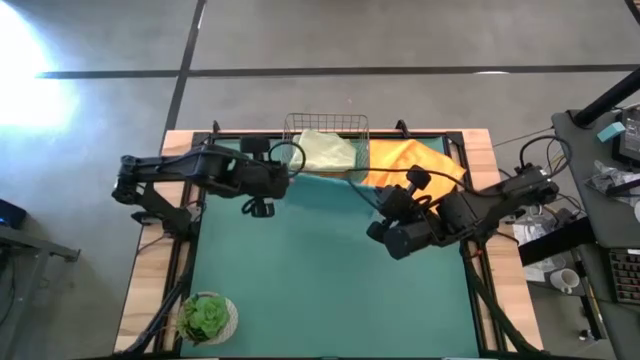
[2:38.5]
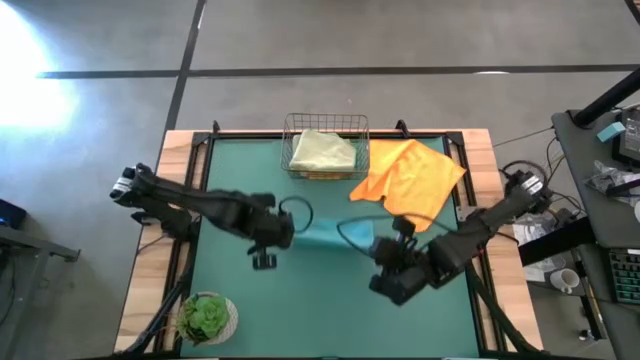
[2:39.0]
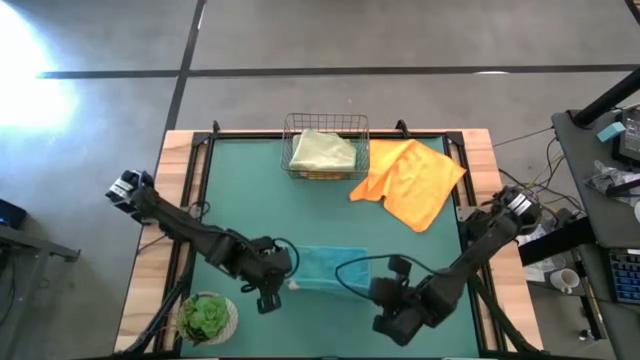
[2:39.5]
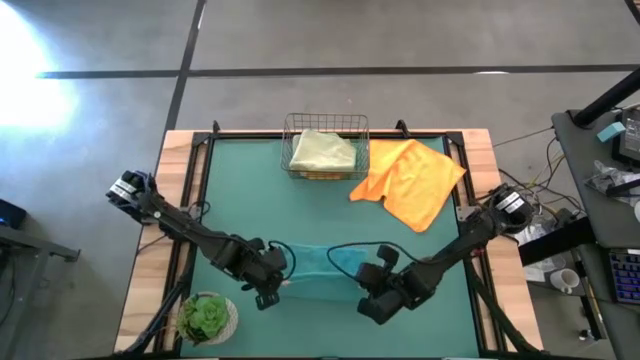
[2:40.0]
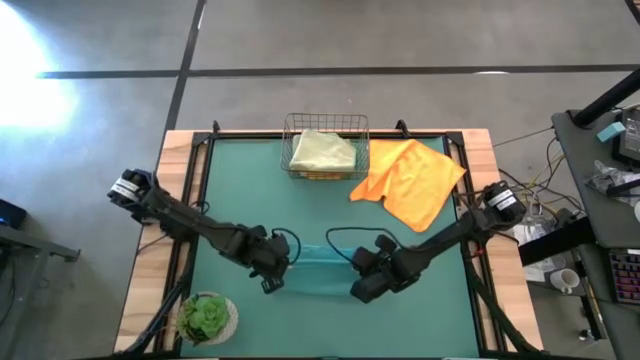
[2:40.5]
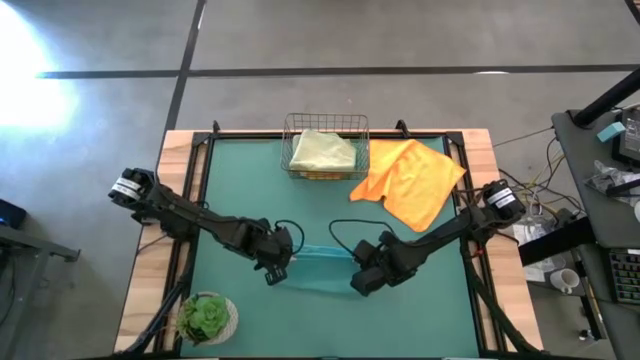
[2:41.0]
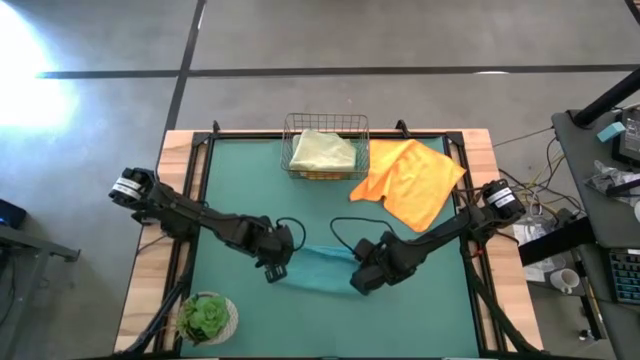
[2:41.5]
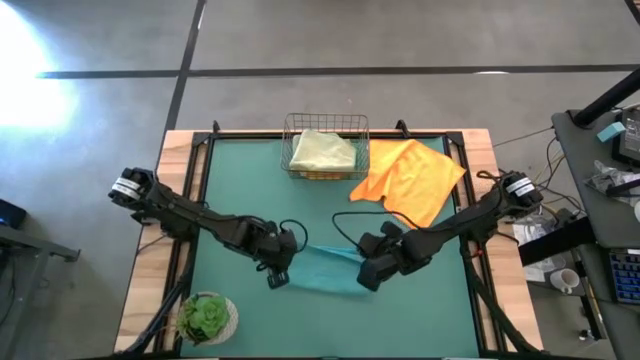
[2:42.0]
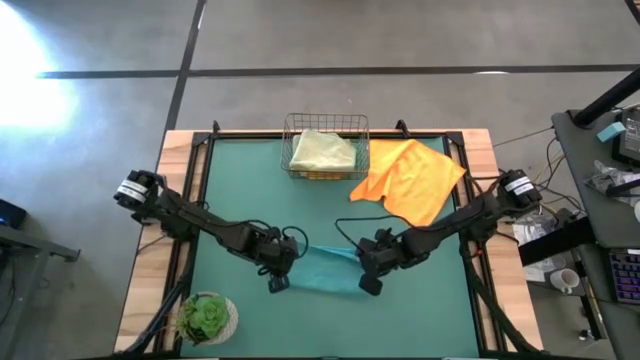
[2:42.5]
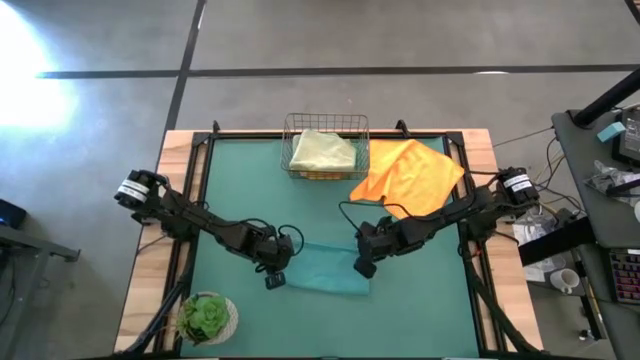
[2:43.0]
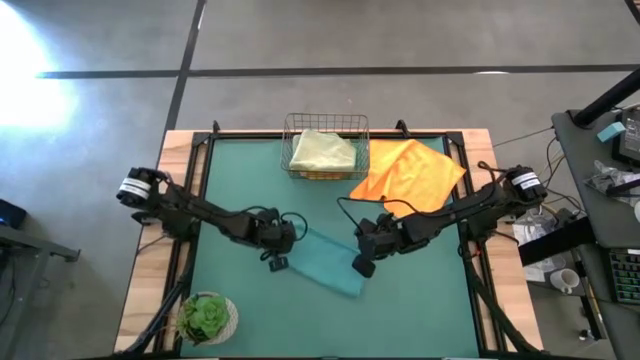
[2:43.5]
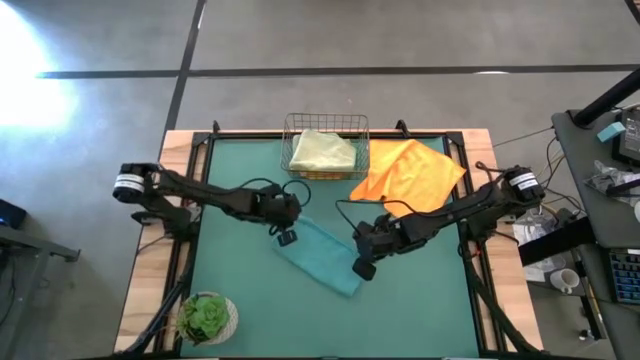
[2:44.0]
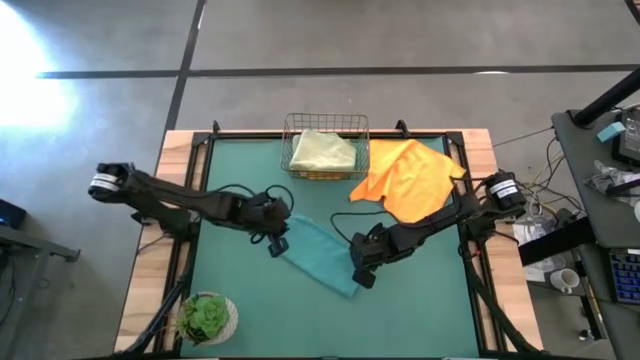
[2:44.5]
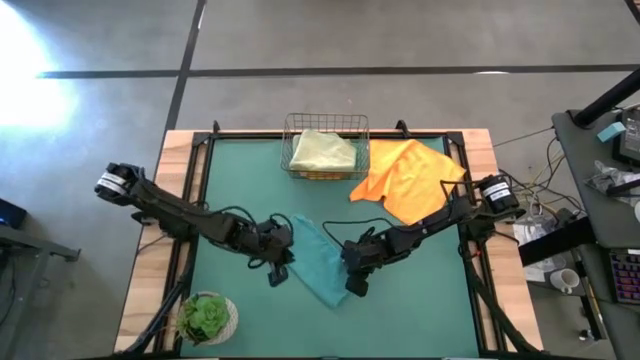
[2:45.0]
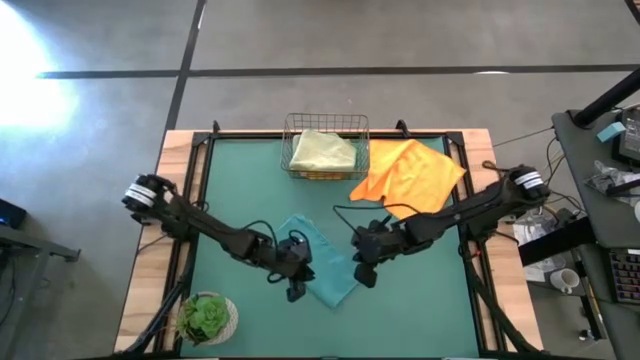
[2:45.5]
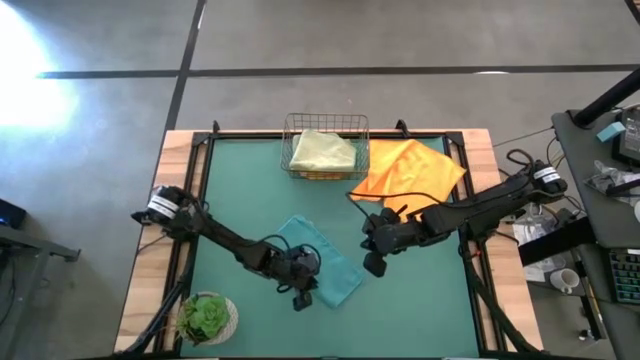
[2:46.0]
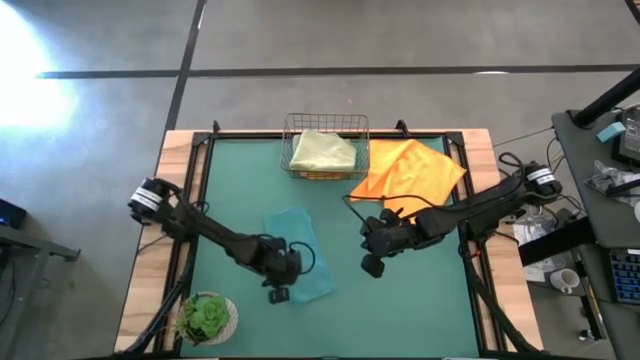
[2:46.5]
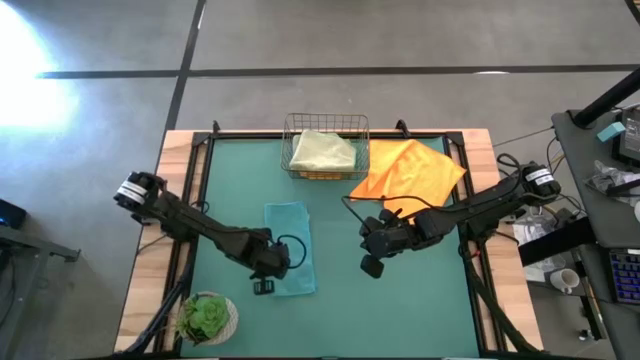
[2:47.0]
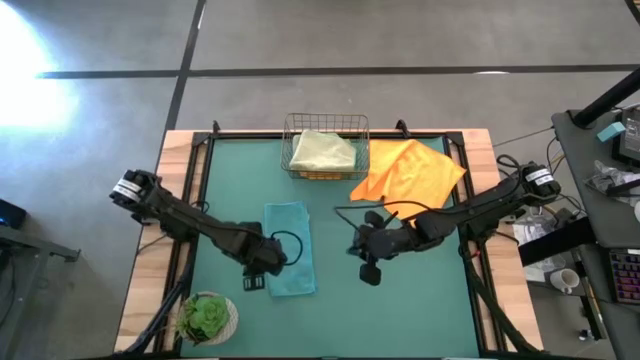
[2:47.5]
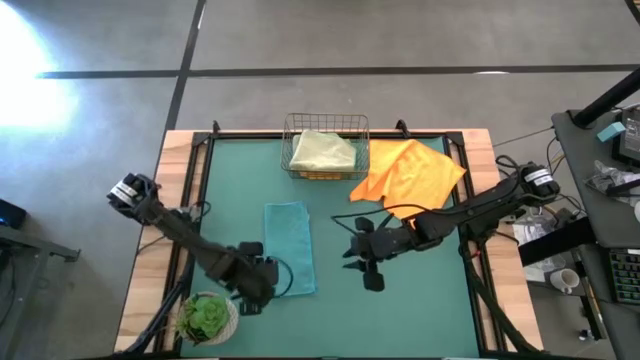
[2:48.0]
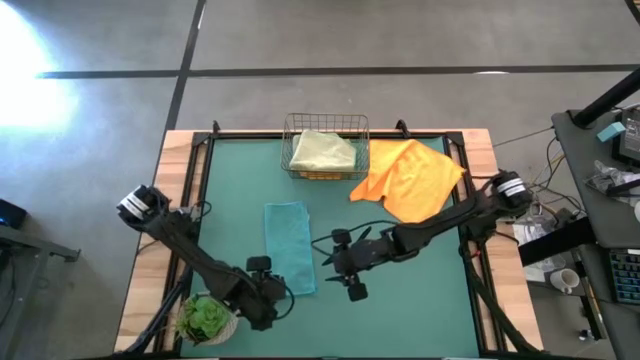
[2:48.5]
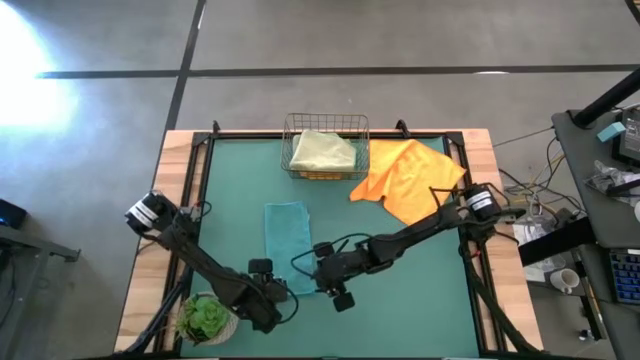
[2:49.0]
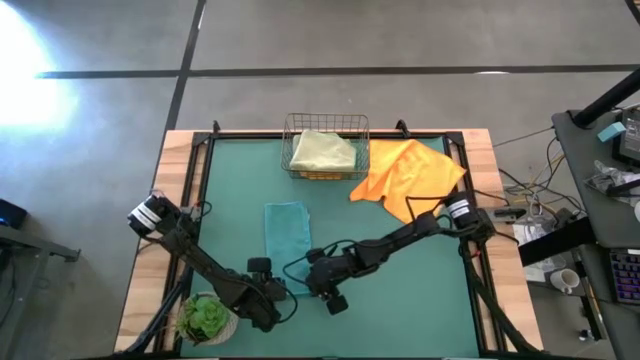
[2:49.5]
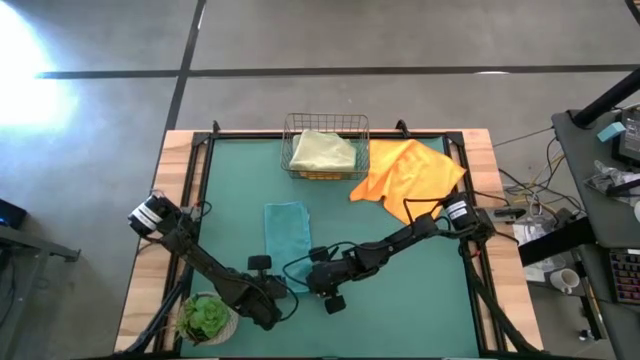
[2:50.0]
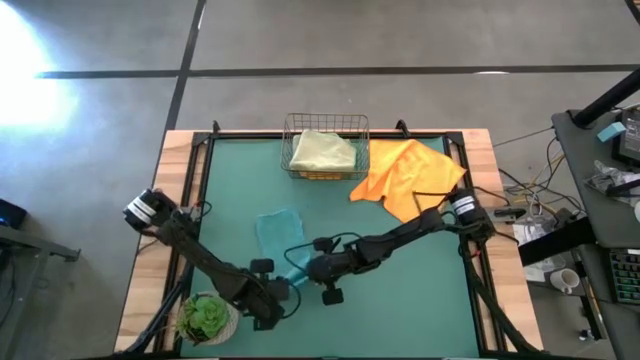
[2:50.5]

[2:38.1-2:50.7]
Task: Fold microfiber towels
Fold the blue microfiber towel

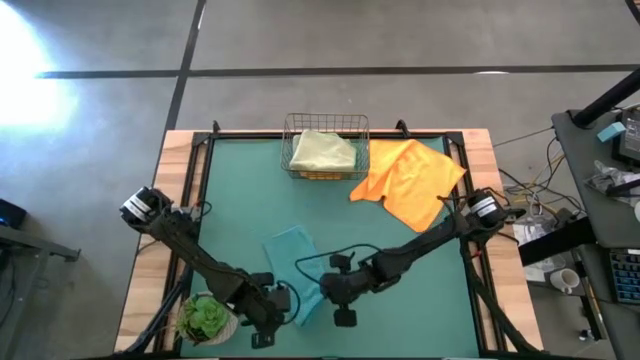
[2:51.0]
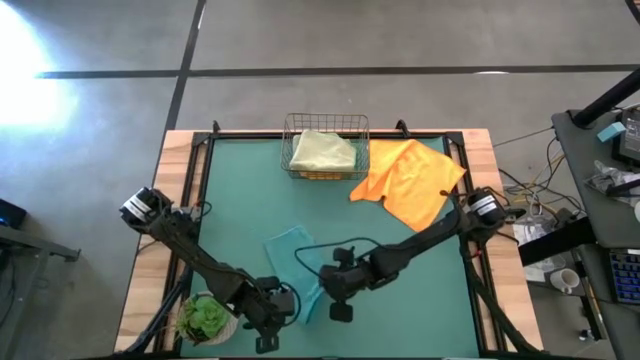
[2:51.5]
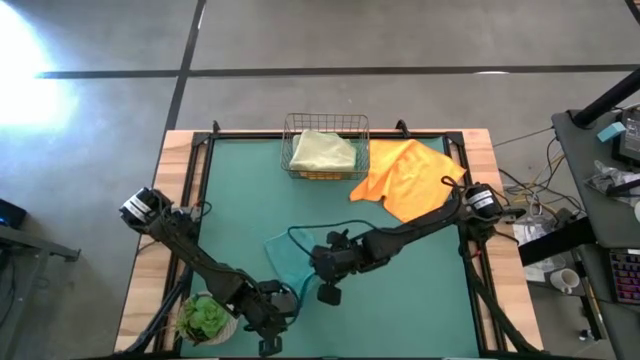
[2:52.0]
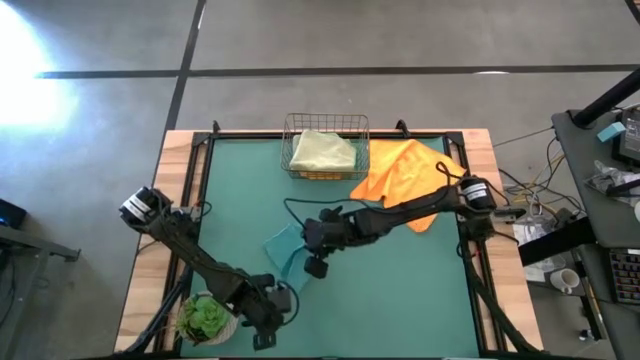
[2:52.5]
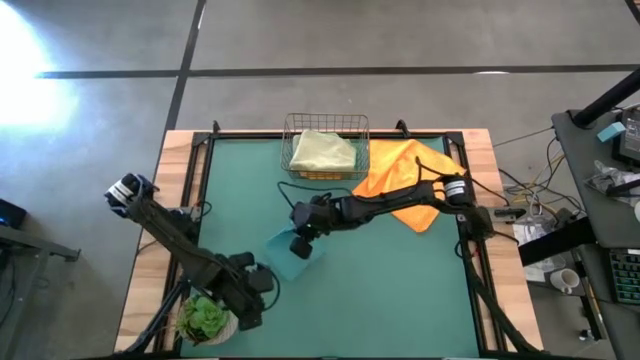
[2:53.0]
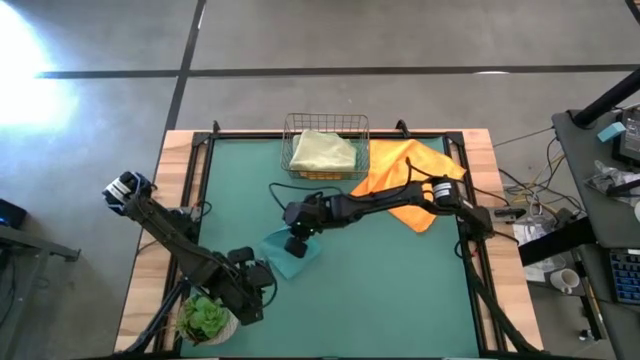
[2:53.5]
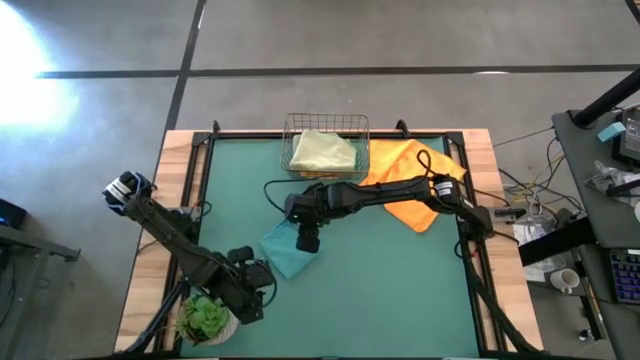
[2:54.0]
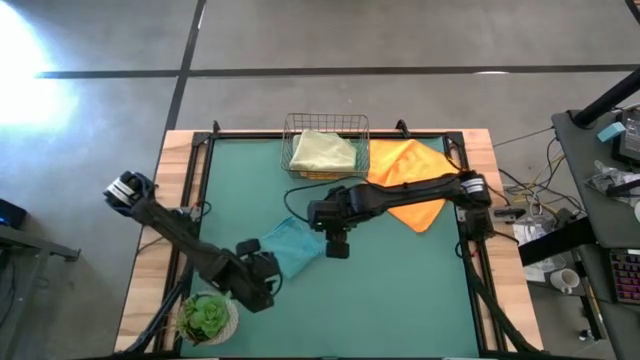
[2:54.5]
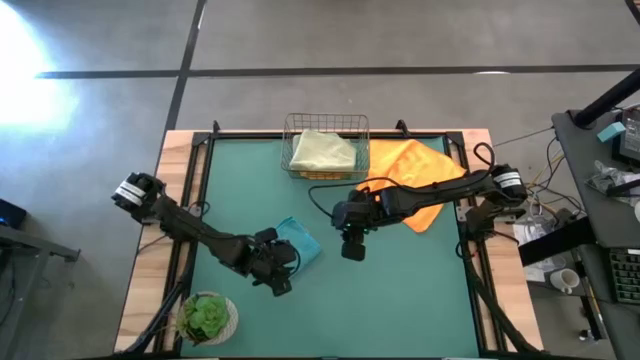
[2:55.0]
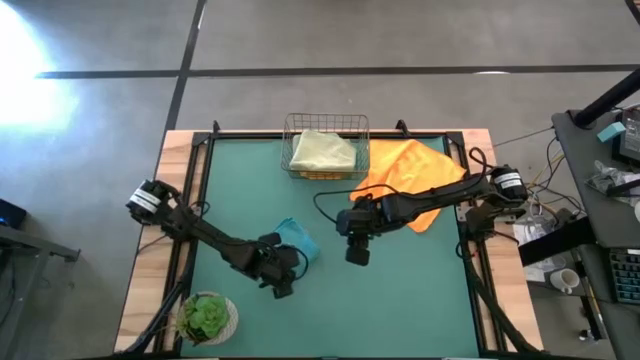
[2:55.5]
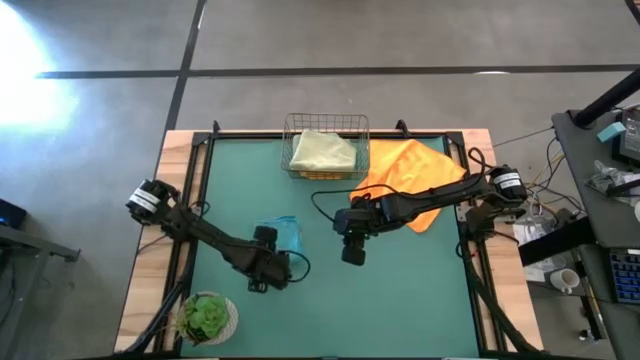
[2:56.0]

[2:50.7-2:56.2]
Fold the blue microfiber towel

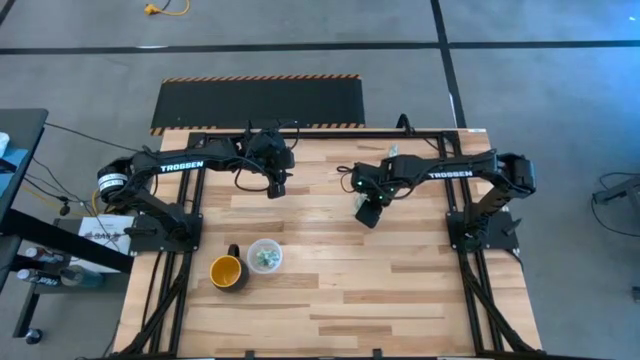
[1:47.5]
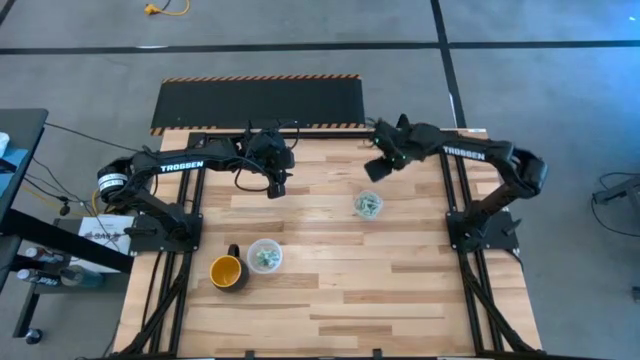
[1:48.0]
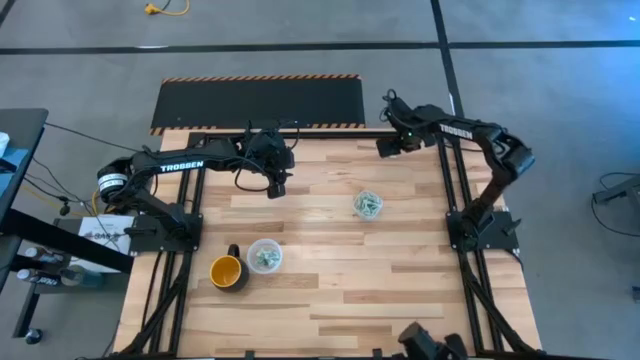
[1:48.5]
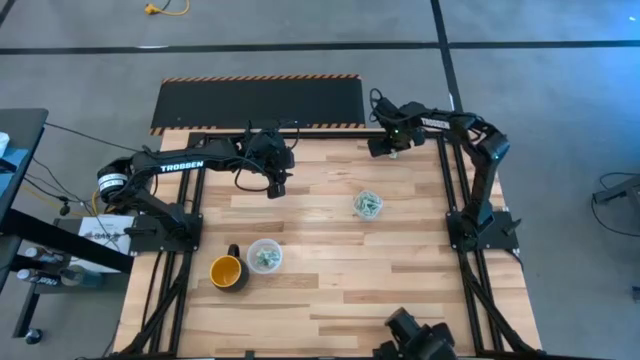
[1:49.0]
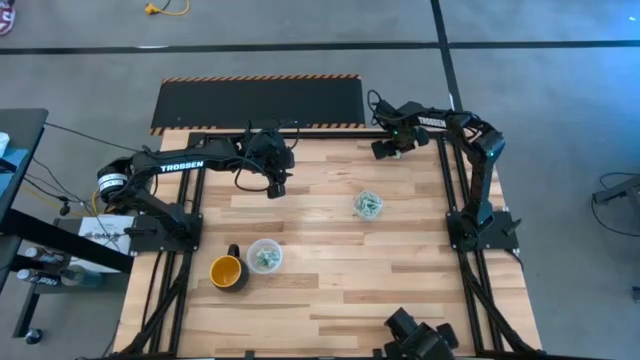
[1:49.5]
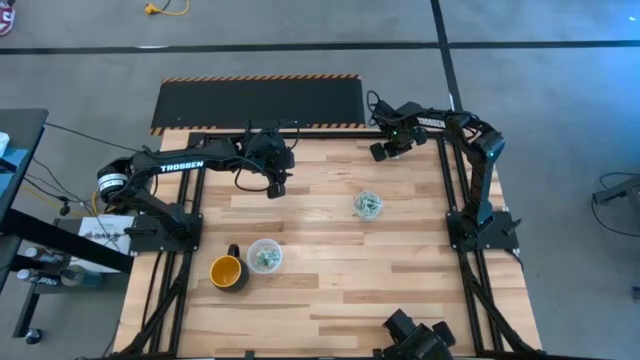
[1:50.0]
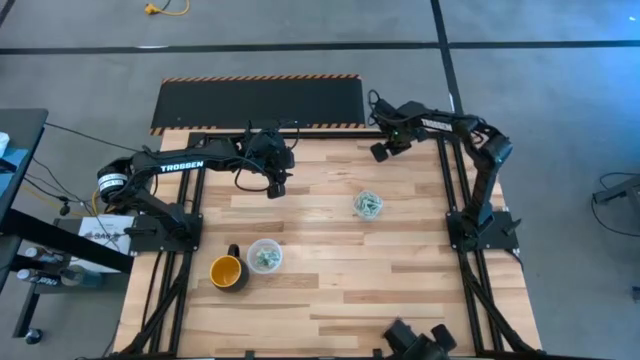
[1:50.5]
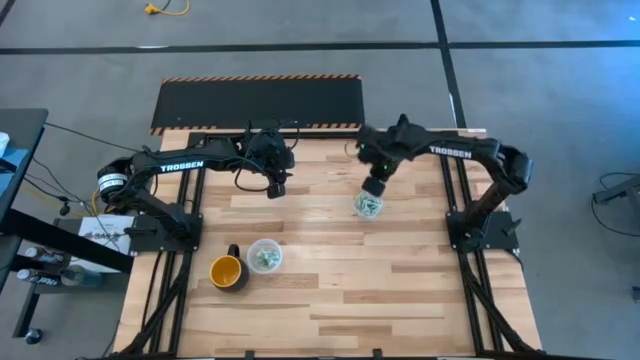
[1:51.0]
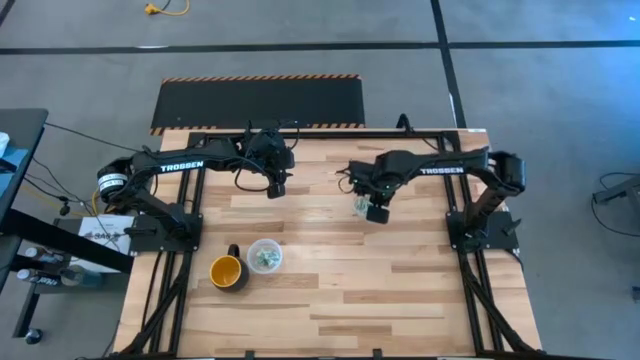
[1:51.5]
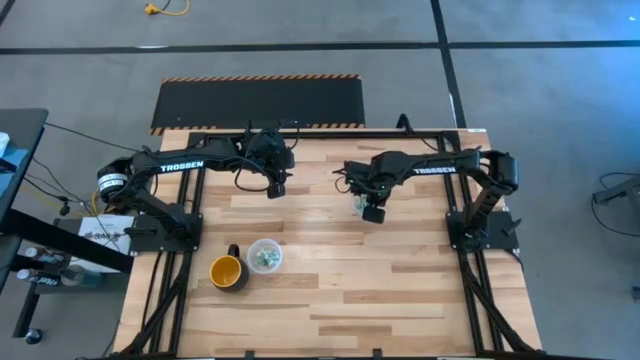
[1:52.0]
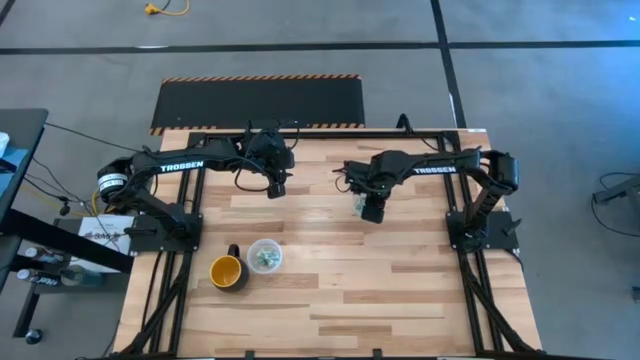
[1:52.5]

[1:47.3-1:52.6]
Task: Pick and place Stevia / Truvia into bins
Put the white stevia packet into the square transparent container
